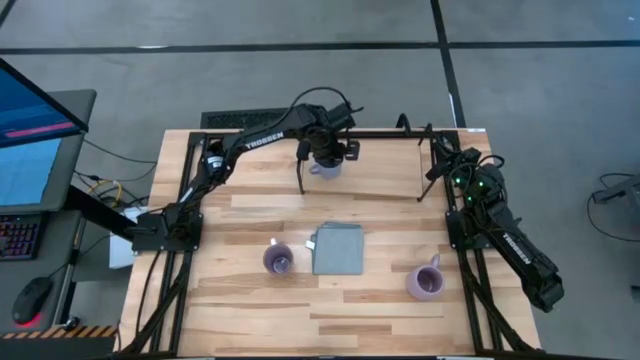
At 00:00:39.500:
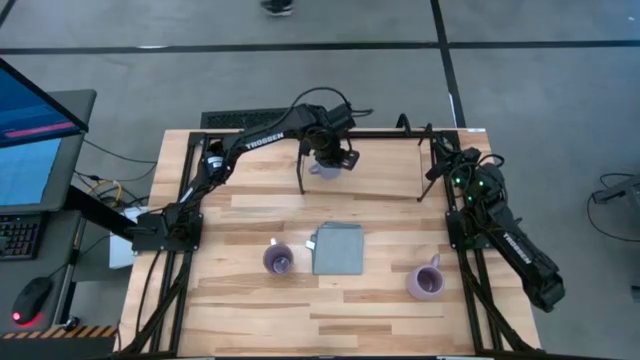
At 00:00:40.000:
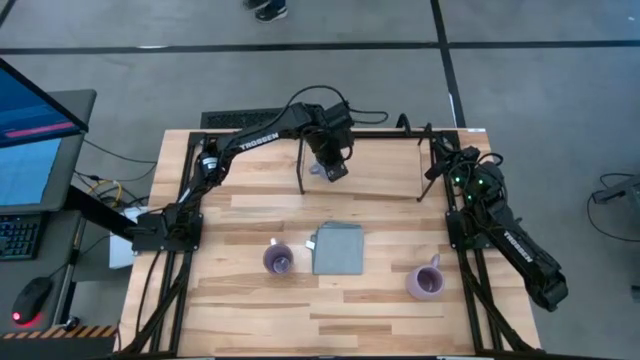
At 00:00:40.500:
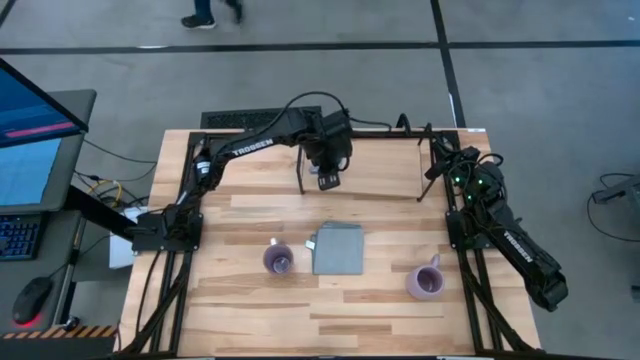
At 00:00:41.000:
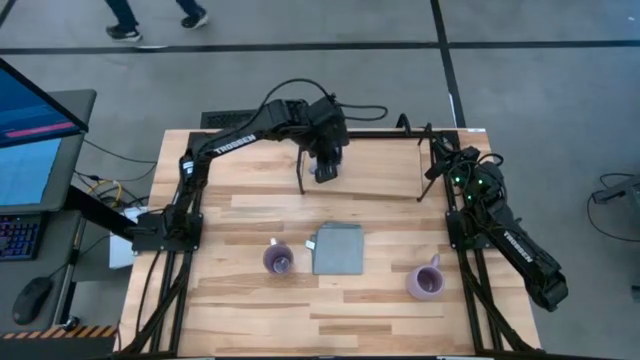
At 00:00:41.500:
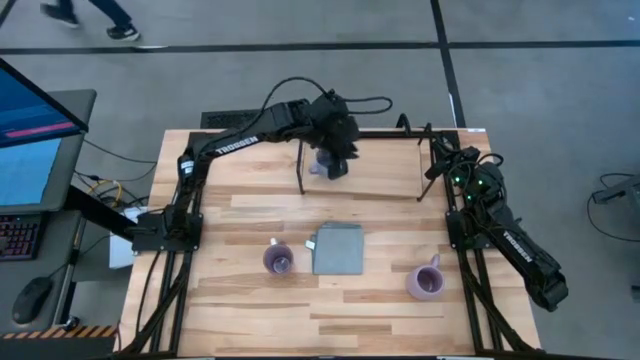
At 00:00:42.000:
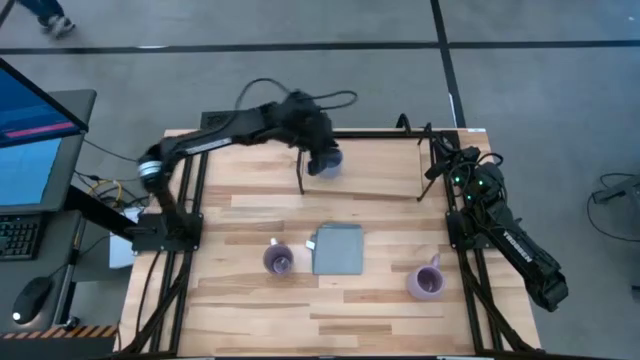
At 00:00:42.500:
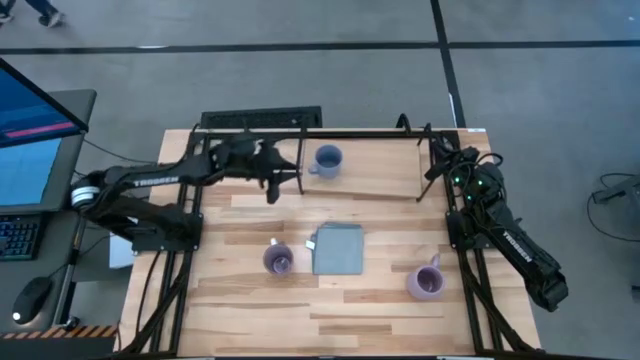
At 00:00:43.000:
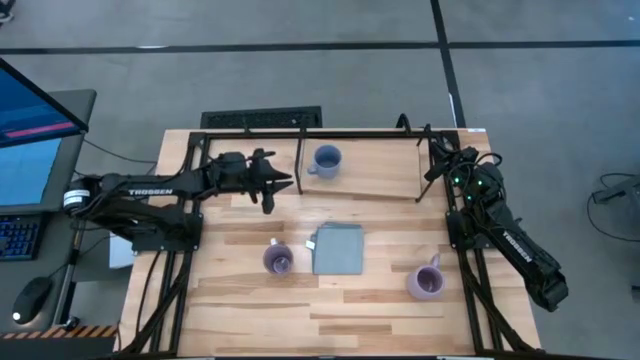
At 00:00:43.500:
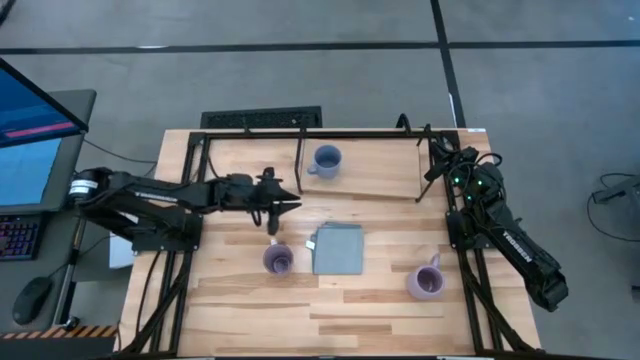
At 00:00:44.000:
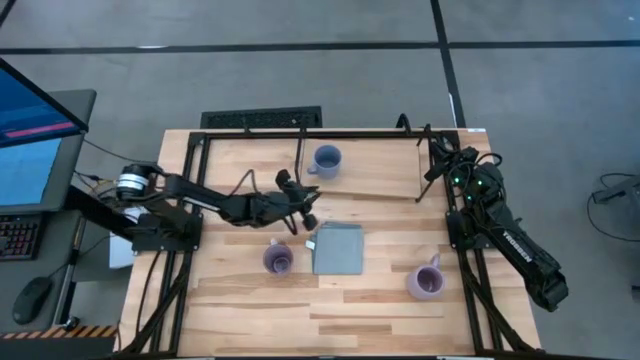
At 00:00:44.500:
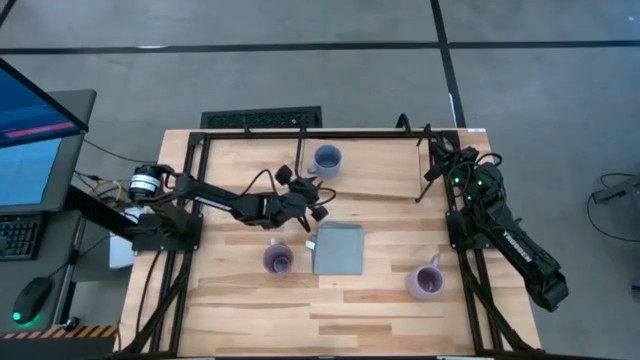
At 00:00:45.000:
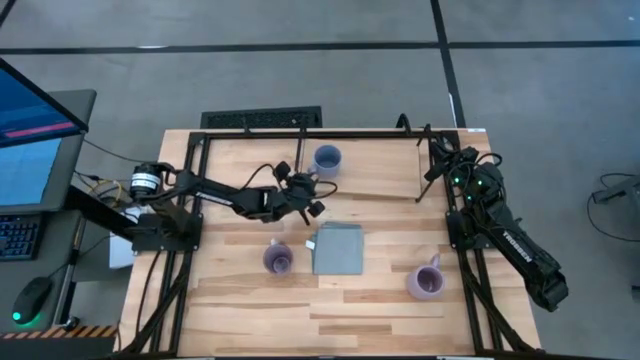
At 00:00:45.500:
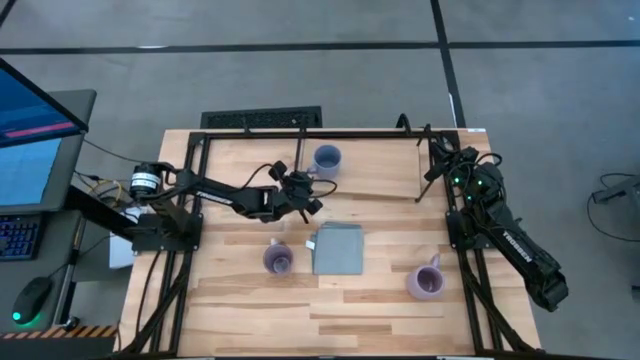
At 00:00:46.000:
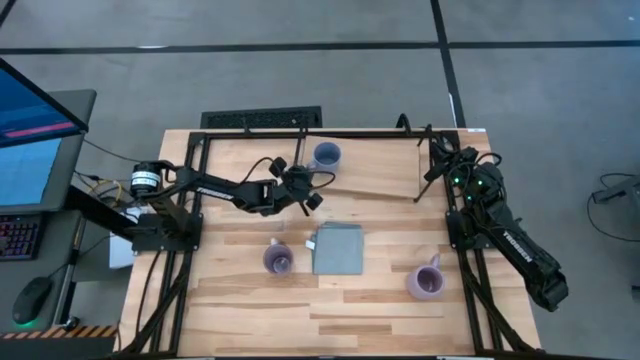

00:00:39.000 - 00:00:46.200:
Task: Stack small to large cups/mugs on shelf
Adjust the shelf

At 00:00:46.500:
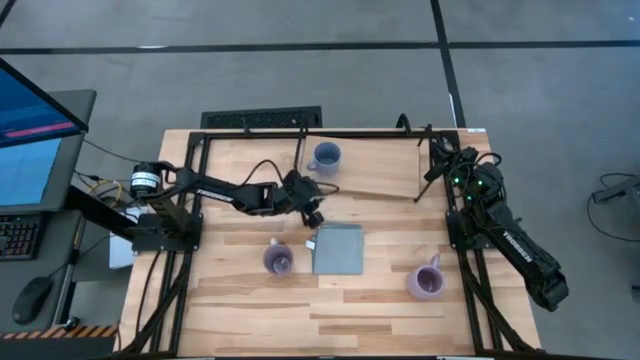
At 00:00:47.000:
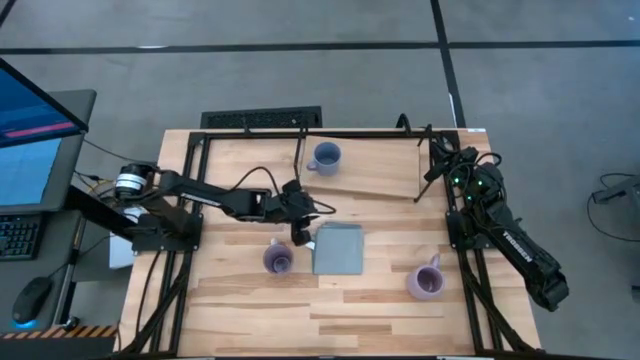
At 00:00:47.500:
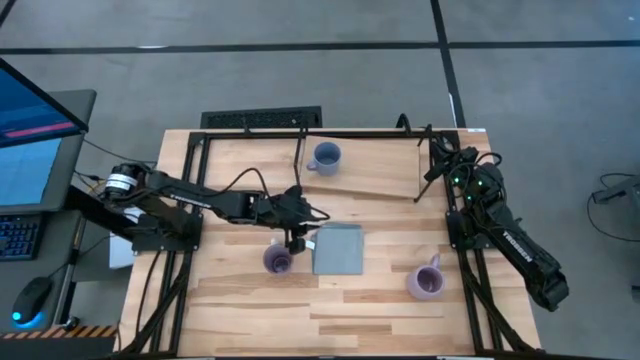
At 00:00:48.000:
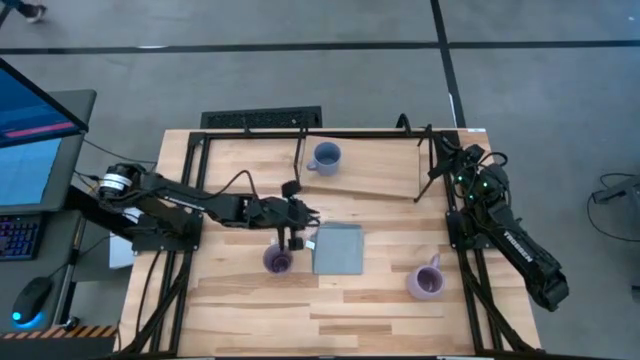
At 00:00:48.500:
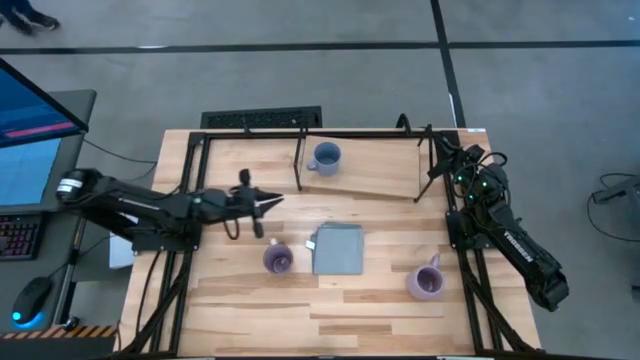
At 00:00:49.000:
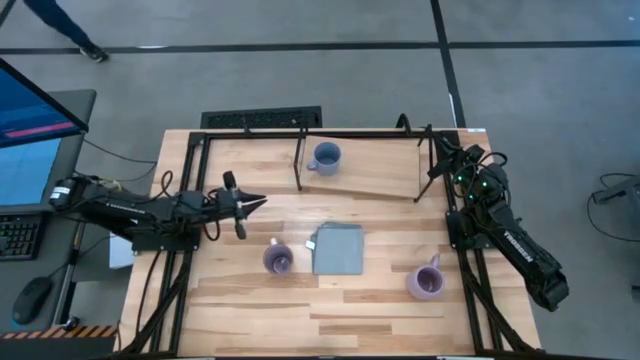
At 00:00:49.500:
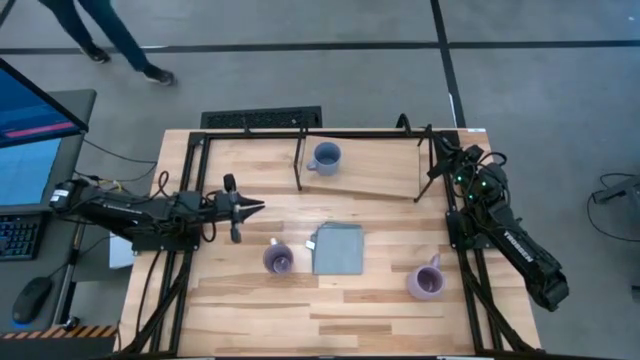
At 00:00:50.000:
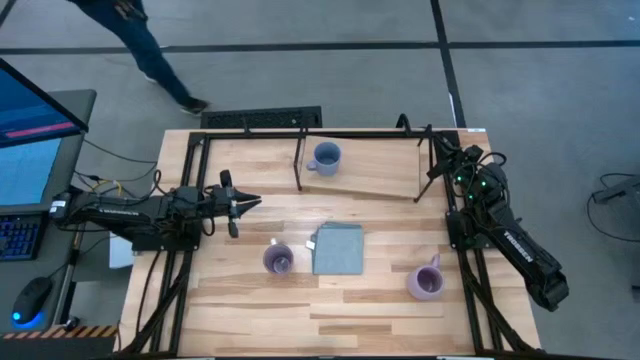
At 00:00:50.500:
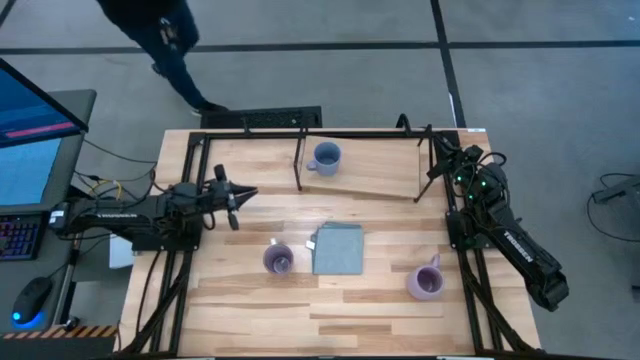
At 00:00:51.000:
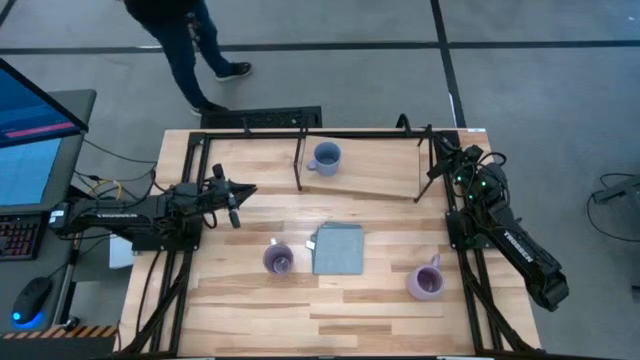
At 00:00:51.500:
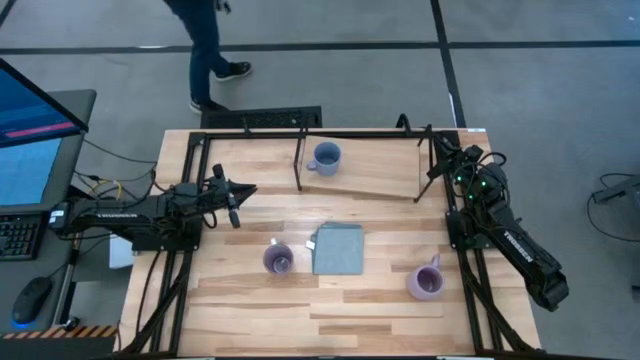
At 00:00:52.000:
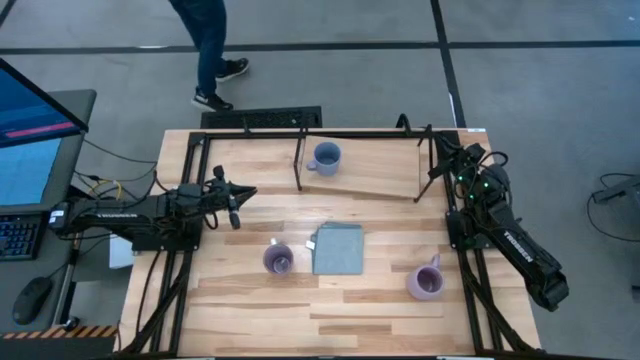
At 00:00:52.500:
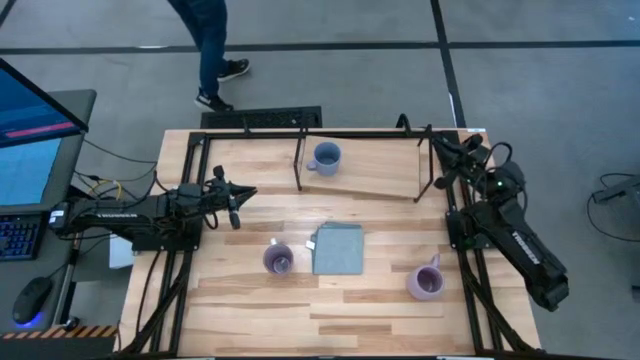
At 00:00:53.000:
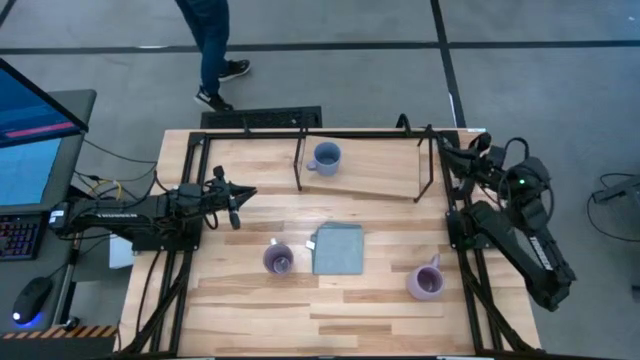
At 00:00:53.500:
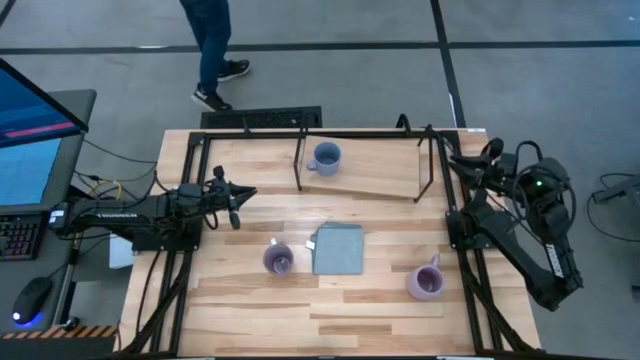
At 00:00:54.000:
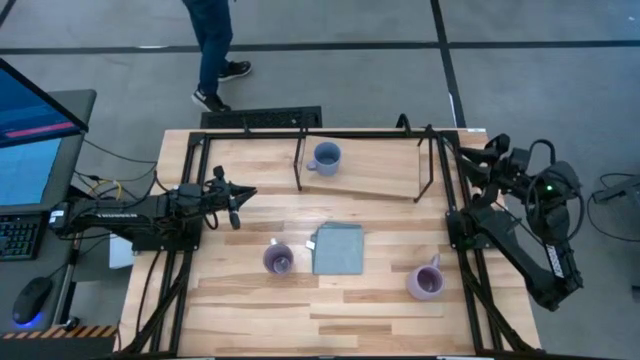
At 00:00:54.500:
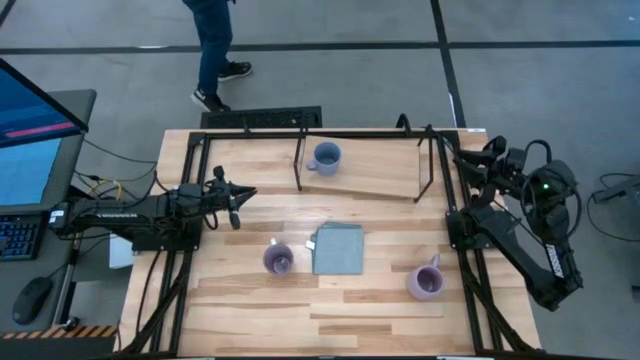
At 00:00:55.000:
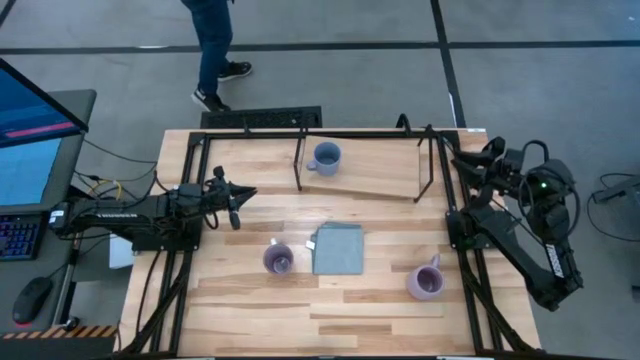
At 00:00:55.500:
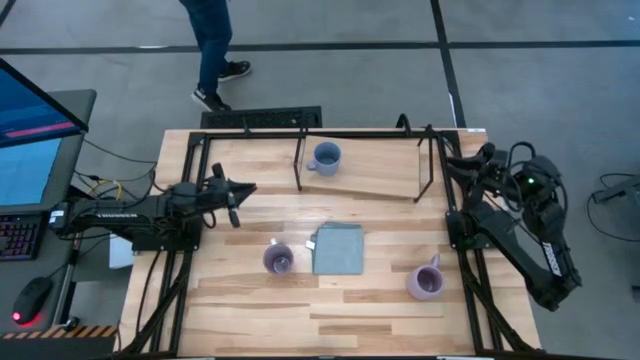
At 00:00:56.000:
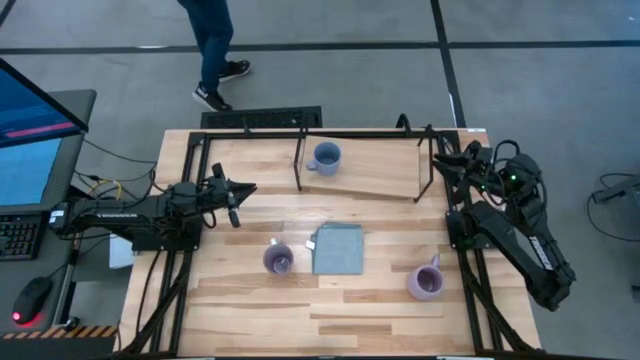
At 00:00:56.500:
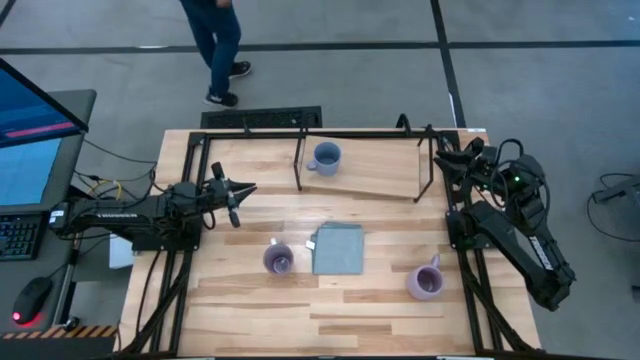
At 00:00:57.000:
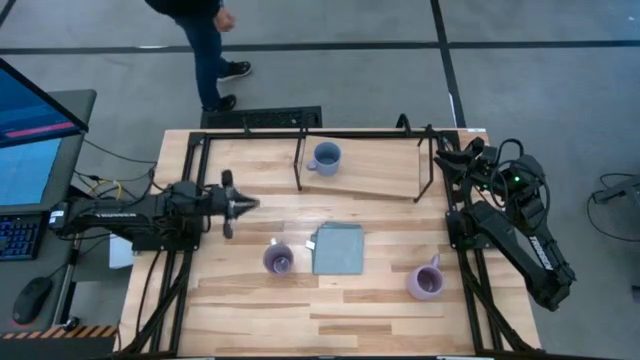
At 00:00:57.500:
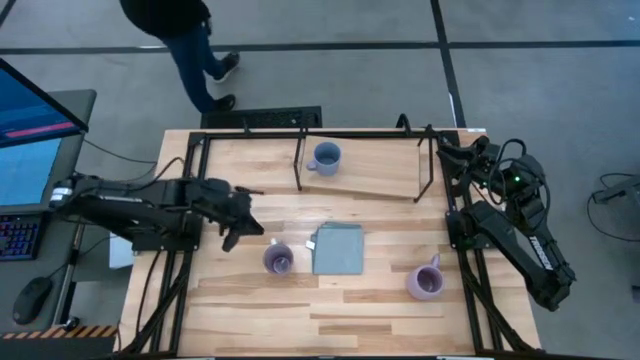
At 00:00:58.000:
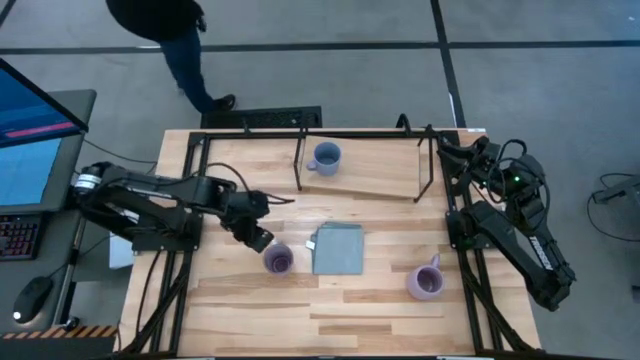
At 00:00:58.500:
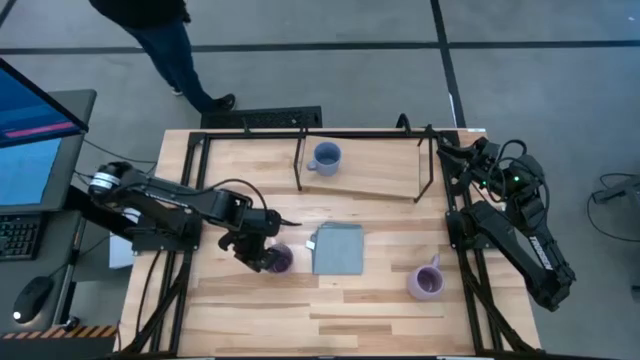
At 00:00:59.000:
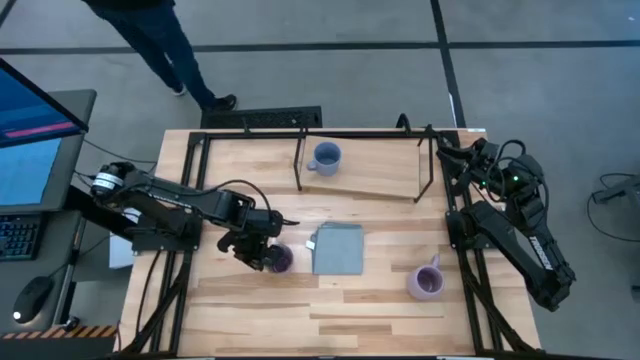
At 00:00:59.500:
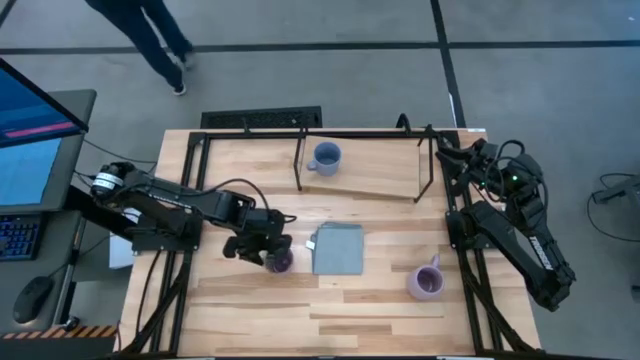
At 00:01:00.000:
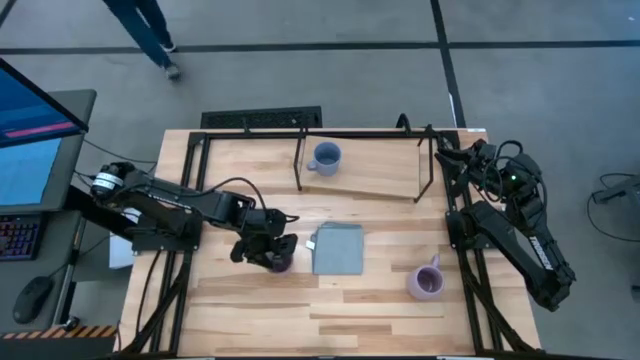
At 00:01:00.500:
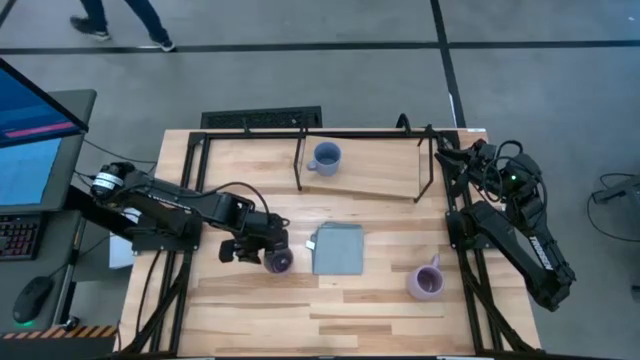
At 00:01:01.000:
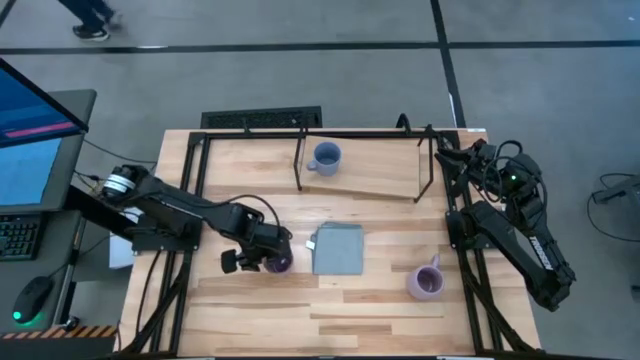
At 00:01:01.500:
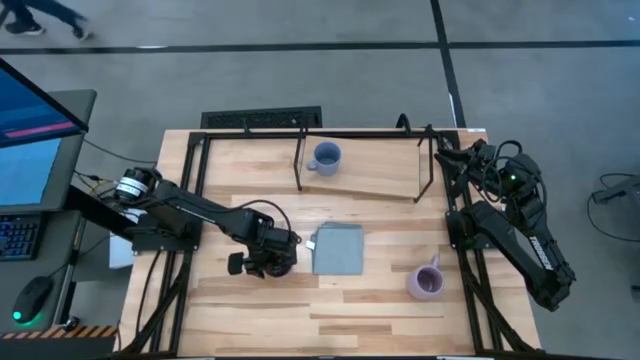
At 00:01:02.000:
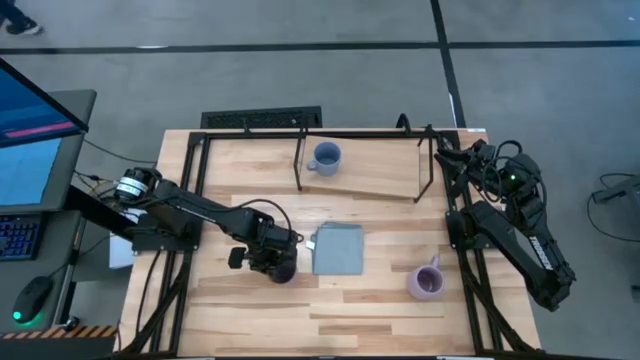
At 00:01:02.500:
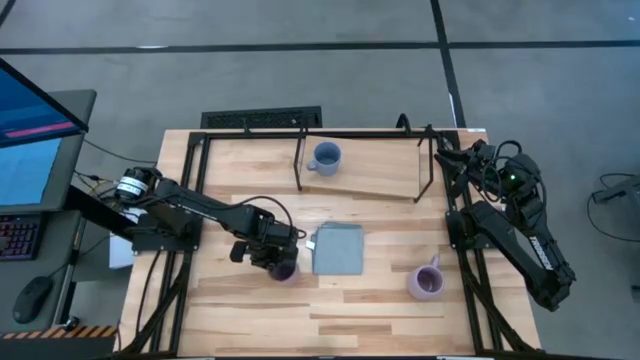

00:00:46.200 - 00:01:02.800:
Put the left violet cup on the shelf
